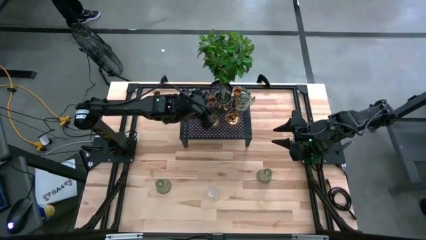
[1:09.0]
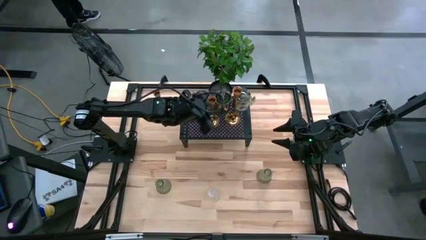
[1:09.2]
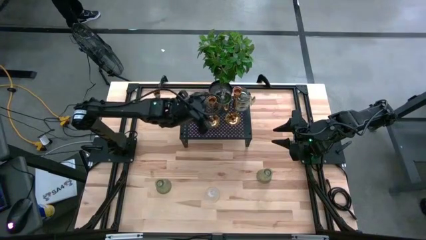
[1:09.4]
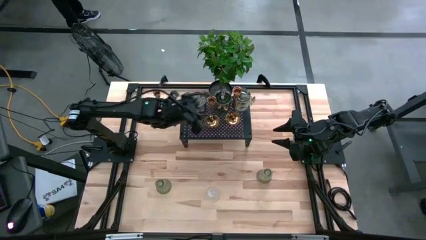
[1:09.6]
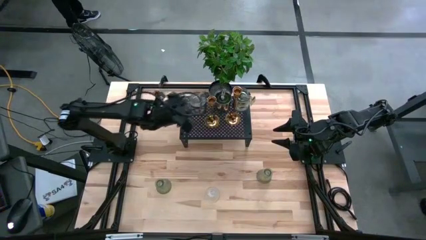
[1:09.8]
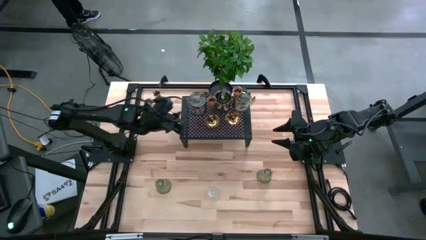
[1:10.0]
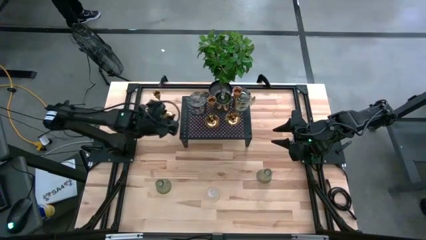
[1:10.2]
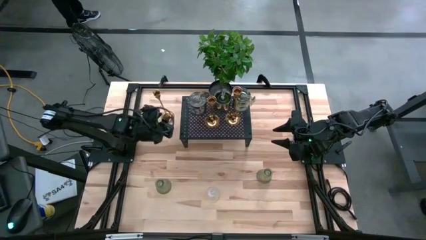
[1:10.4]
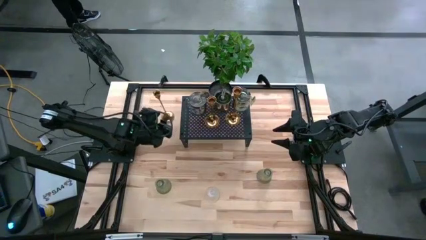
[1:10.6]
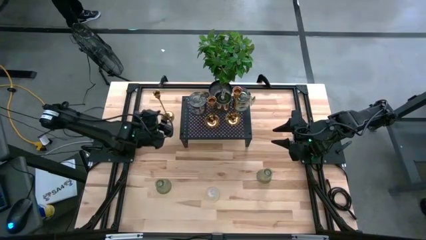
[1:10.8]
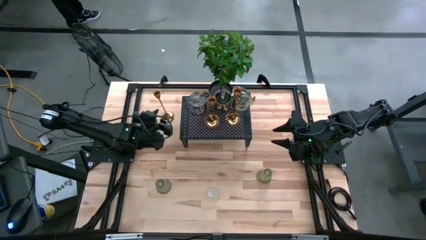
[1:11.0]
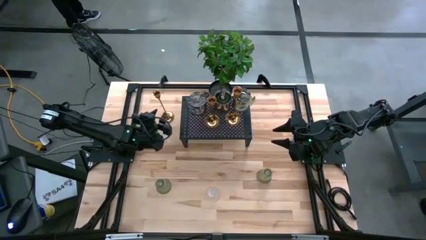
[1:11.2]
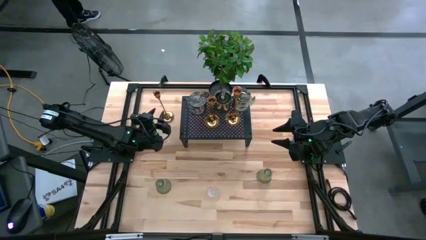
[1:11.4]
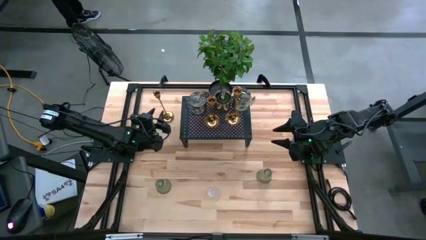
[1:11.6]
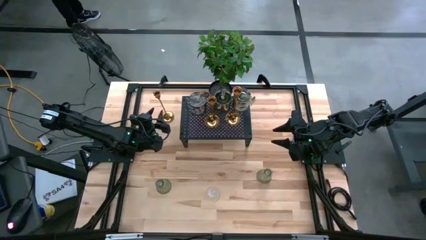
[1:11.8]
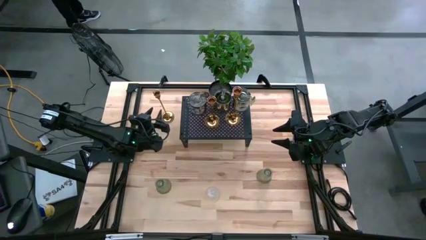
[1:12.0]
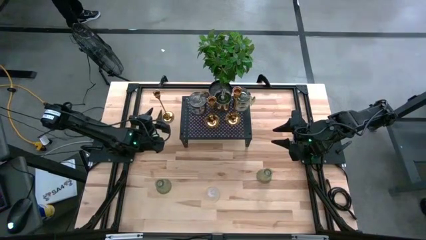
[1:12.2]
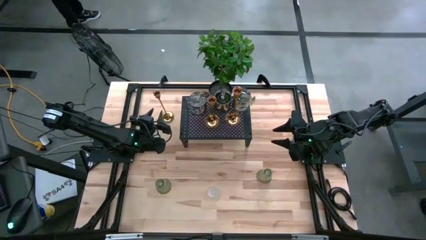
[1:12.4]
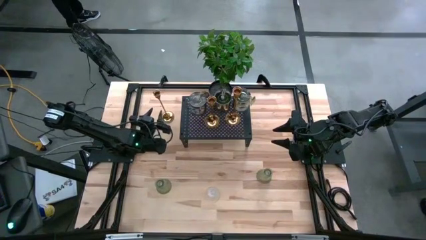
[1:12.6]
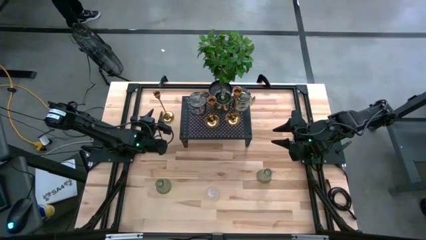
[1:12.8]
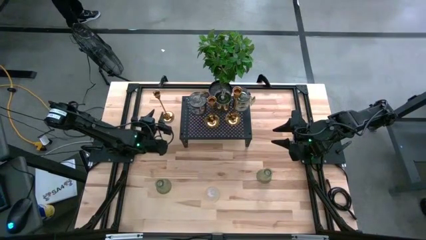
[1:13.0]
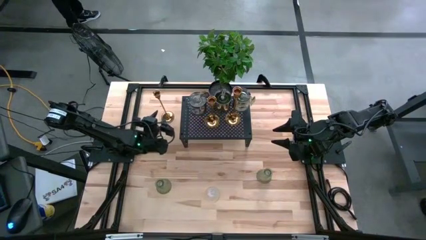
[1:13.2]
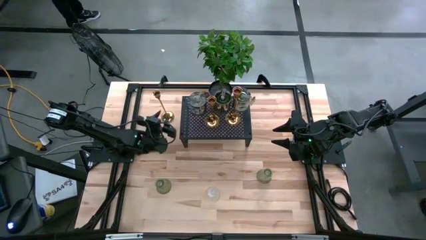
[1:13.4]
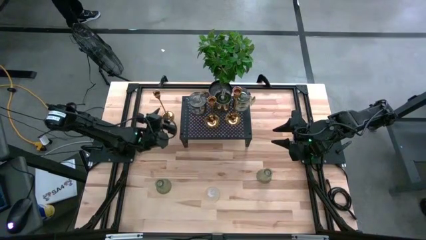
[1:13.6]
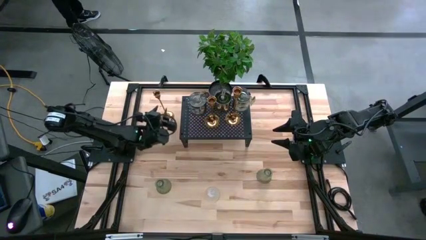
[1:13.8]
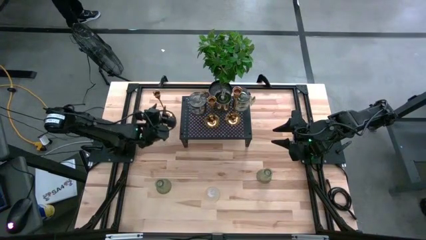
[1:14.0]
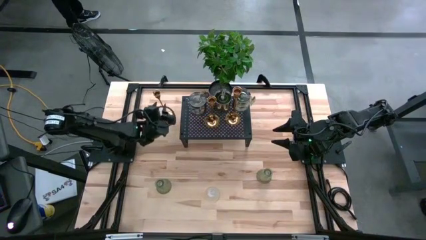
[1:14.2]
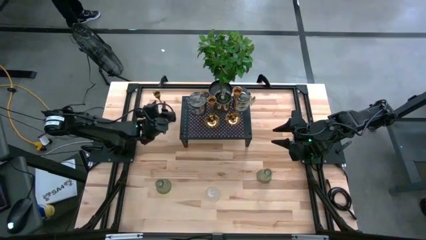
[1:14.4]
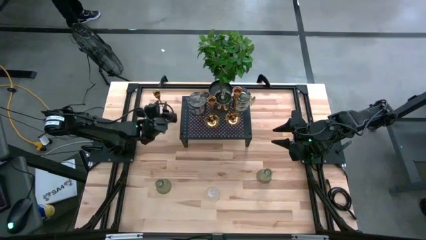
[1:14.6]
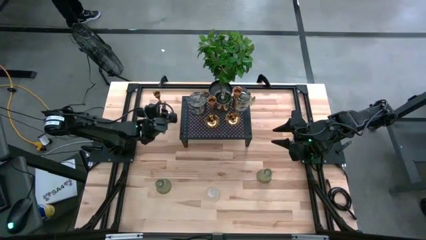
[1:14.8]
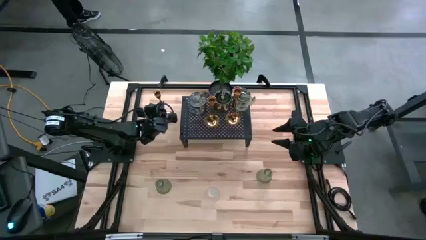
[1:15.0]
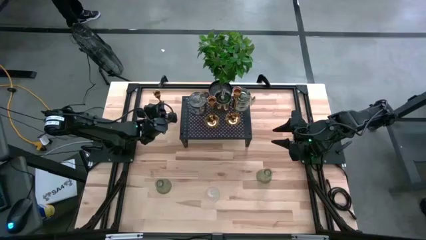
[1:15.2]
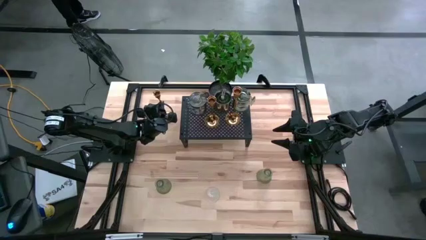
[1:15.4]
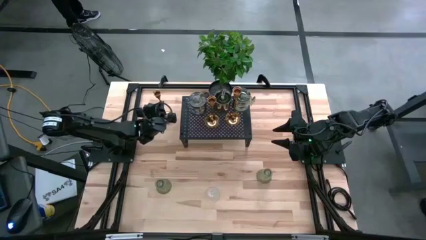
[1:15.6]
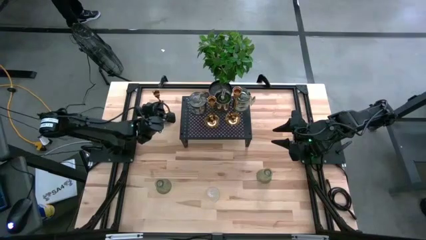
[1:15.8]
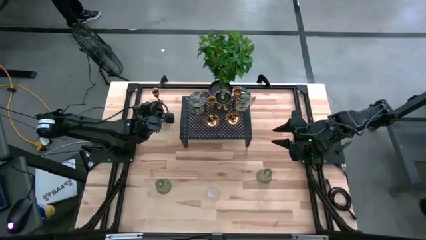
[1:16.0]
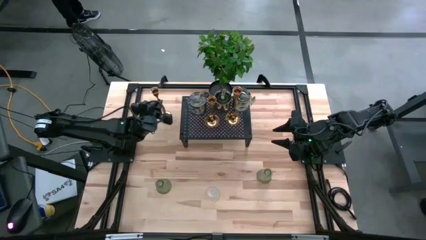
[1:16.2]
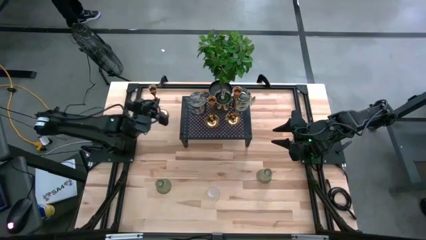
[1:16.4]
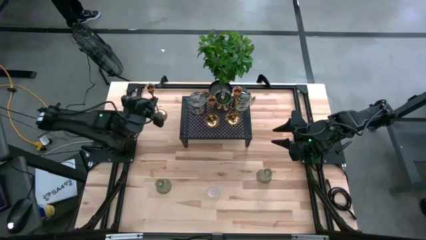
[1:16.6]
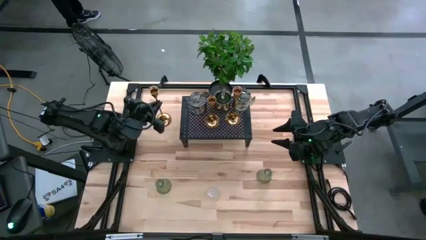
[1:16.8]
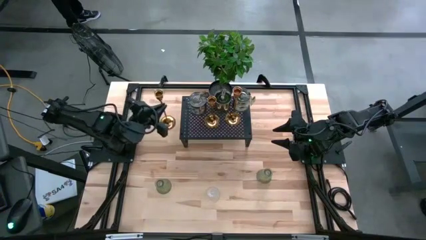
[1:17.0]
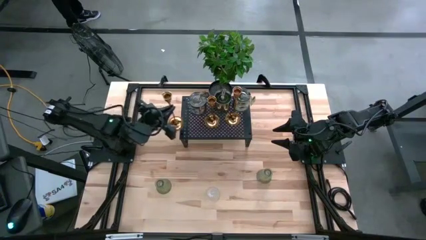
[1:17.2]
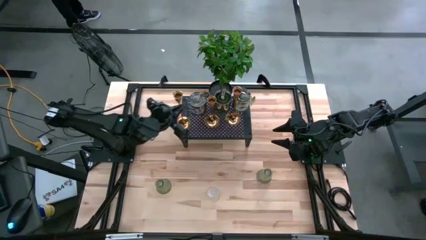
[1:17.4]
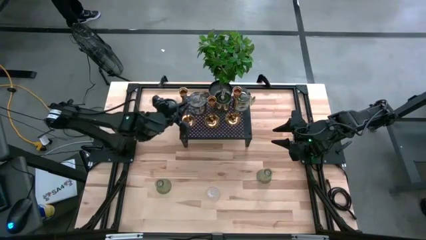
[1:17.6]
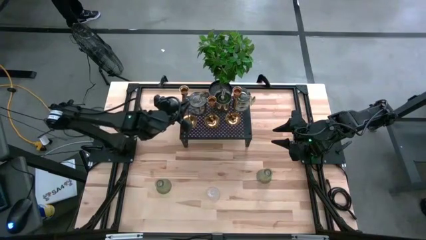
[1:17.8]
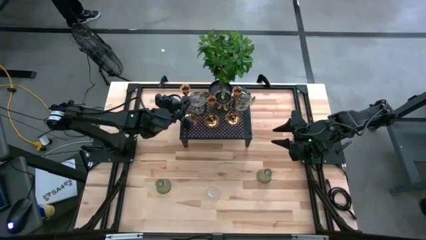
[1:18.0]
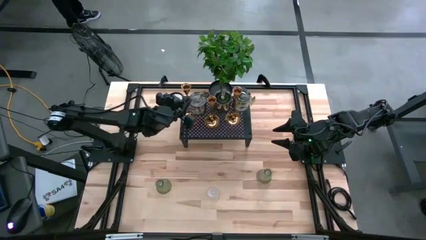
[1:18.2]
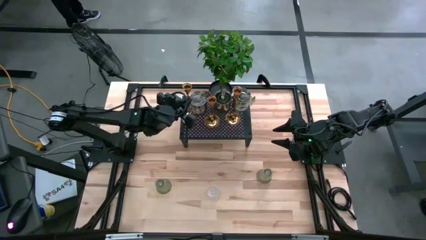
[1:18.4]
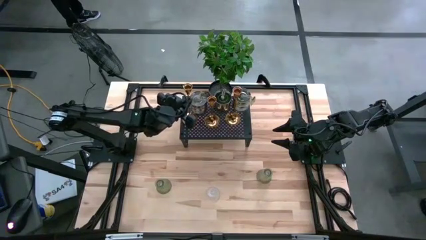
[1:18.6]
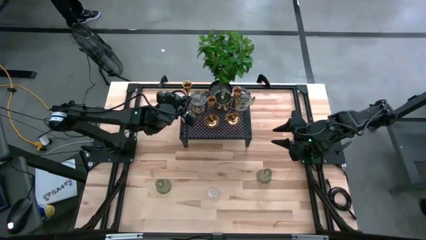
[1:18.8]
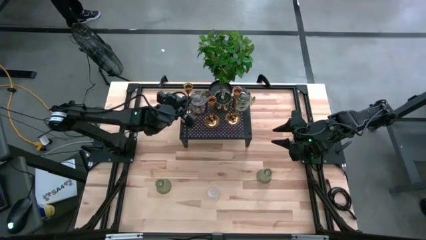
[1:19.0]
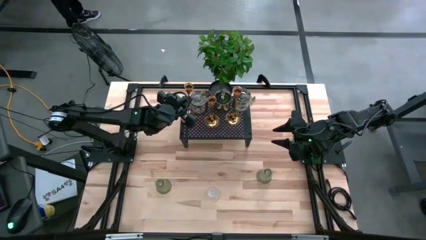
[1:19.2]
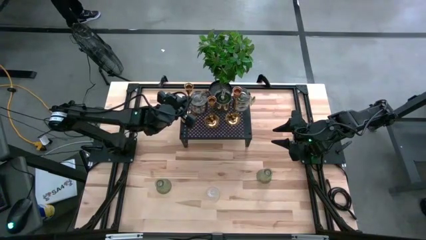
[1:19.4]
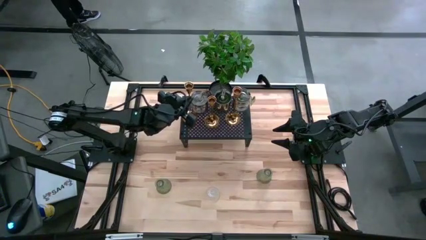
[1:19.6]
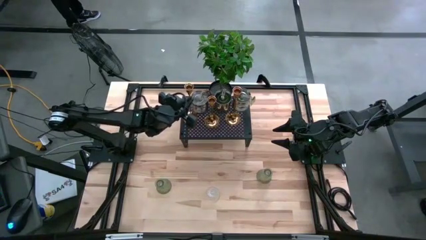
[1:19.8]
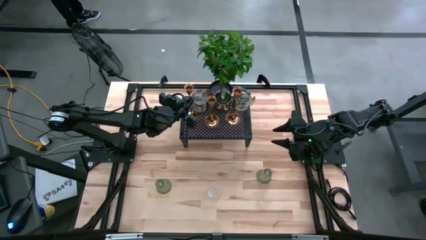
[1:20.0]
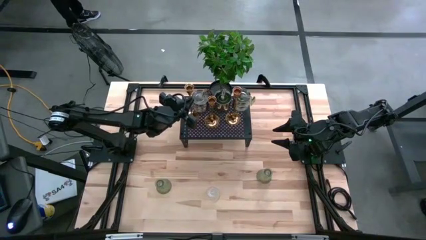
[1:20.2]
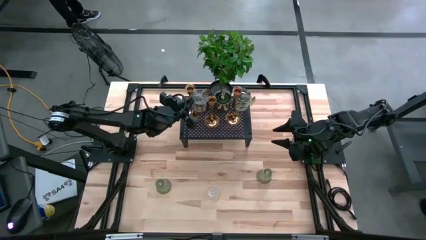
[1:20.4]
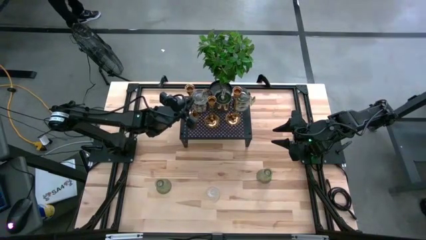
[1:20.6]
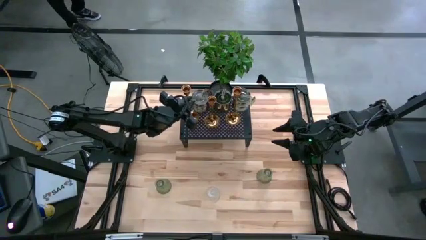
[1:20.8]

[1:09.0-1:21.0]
Task: Pick & Place candle stick holders
Put the gold candle holder on the shelf aligned with the other gold candle holders

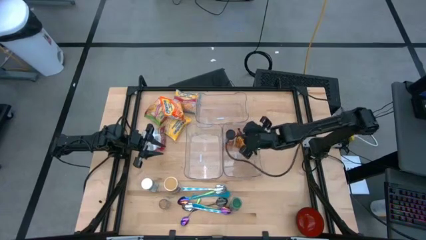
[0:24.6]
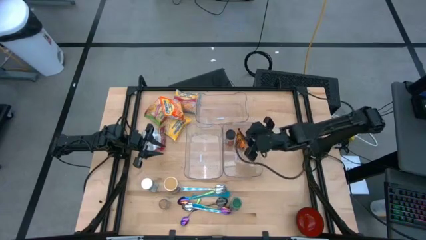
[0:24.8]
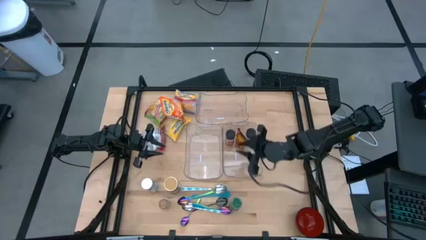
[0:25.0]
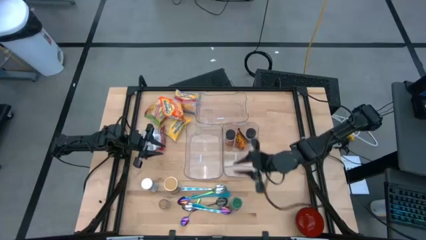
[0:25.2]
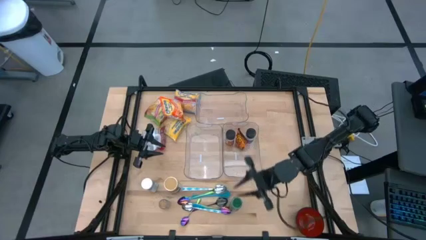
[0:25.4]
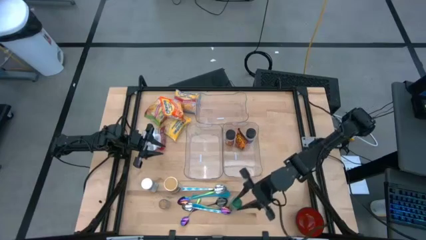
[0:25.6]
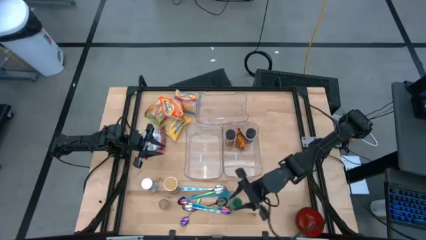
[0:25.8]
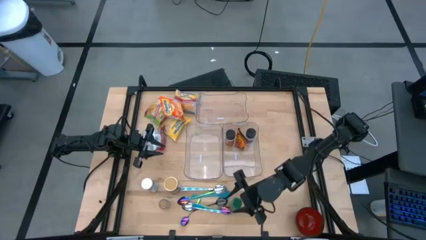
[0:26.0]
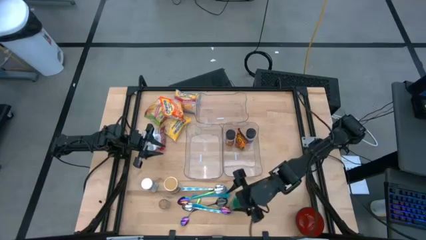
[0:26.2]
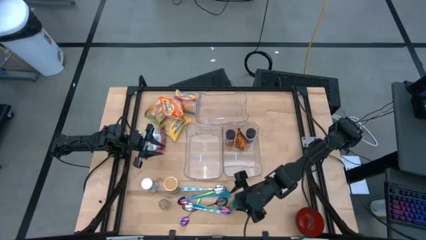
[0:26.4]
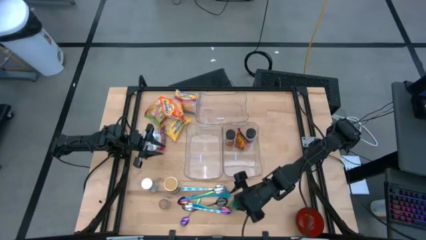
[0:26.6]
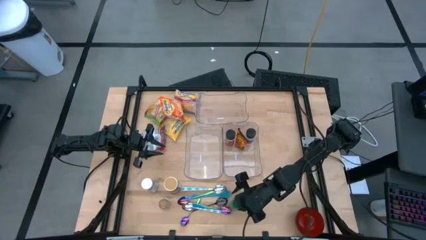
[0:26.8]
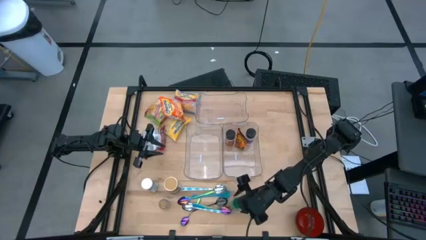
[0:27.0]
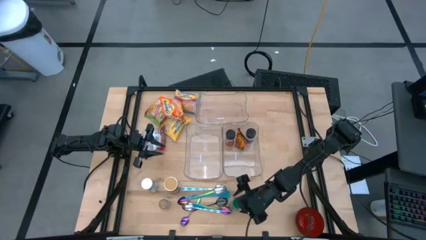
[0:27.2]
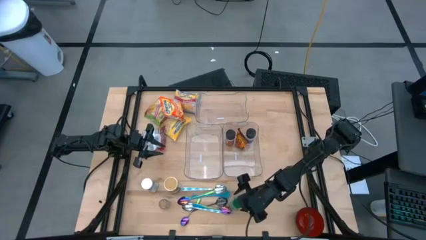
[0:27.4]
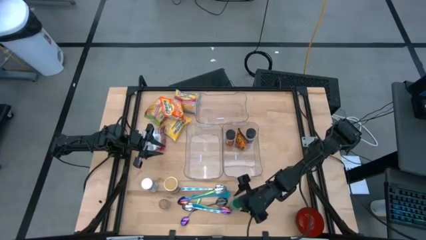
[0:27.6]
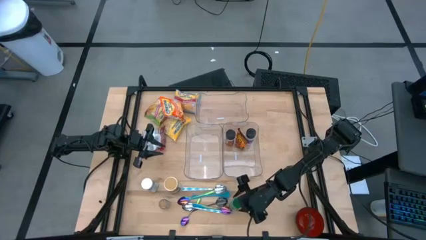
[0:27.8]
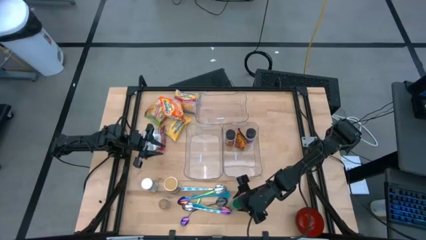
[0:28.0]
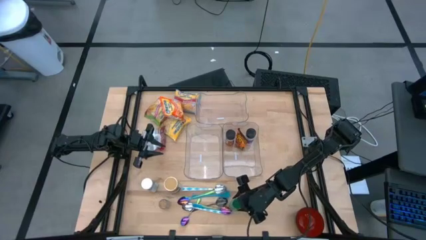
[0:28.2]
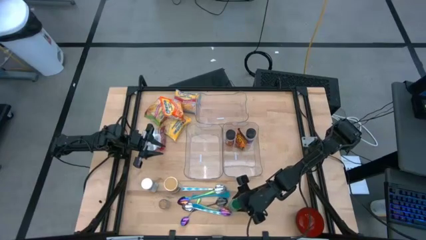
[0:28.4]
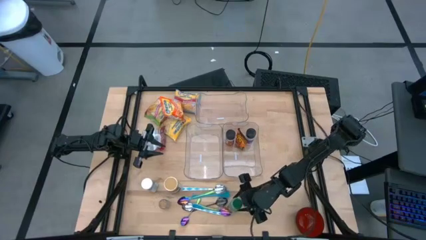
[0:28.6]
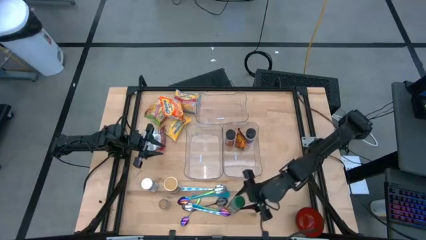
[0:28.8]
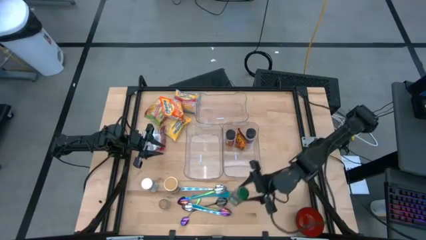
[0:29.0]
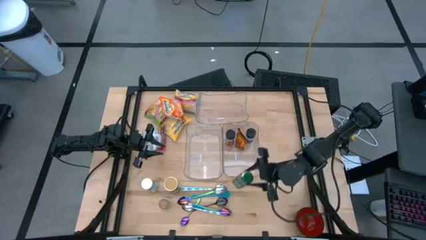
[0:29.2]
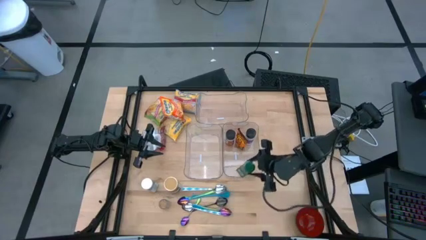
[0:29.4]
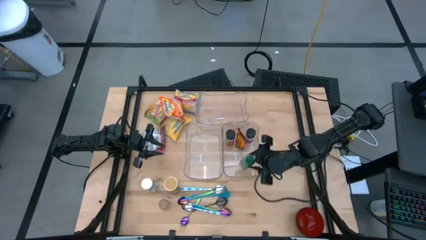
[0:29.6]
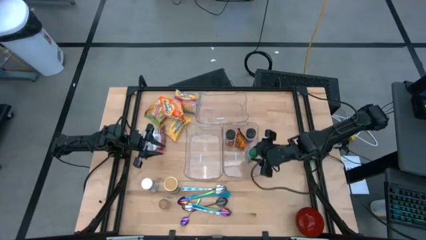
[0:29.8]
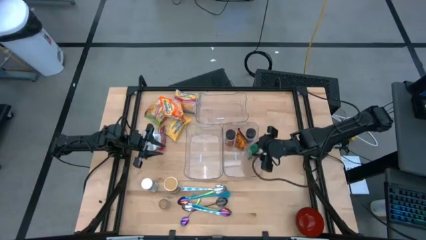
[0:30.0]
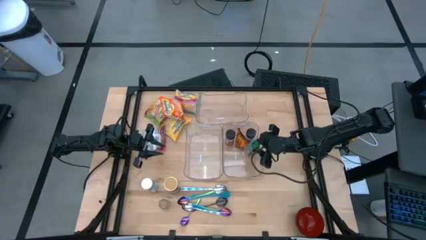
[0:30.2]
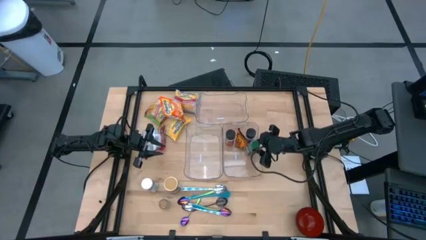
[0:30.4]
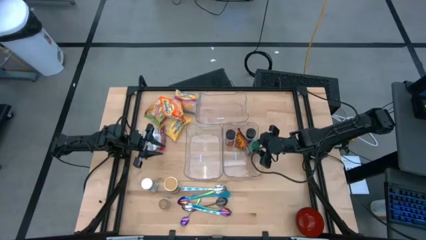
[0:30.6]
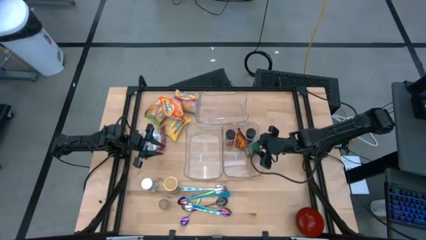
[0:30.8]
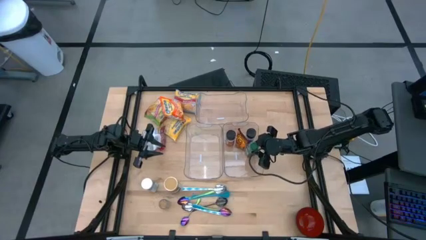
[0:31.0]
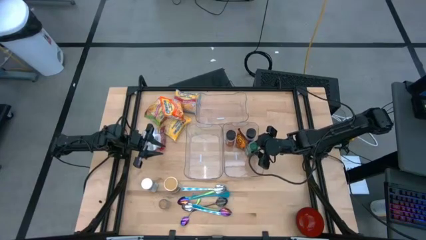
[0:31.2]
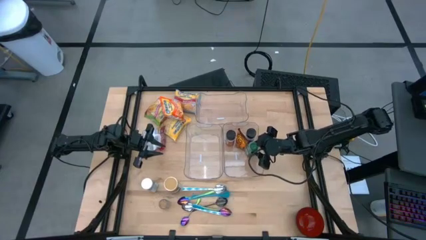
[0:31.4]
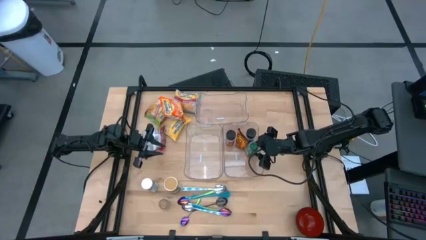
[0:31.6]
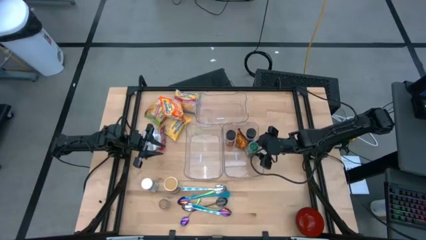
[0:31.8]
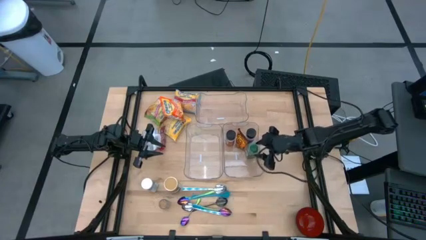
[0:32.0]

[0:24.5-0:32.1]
Task: Pick & Place Food Item
Put the green seasoning bottle into the bottom right transparent bin
